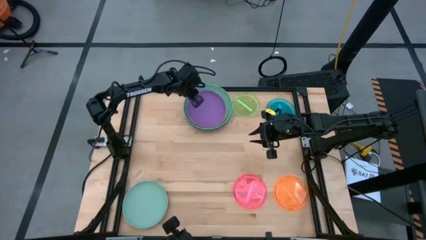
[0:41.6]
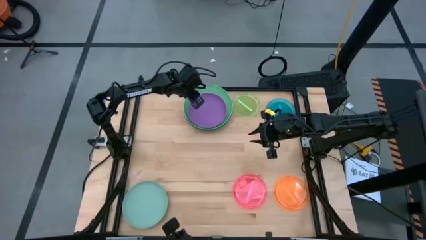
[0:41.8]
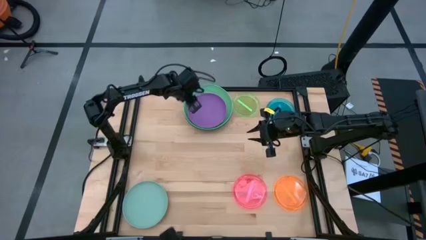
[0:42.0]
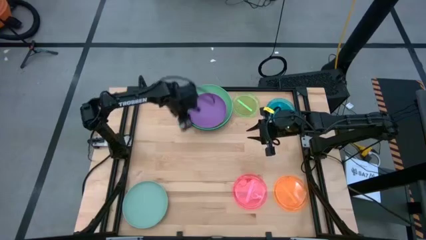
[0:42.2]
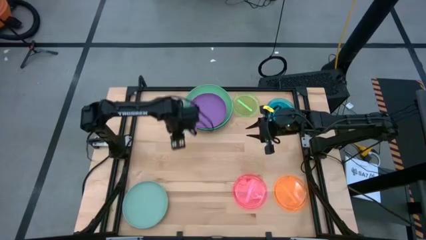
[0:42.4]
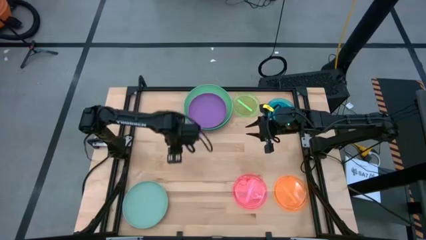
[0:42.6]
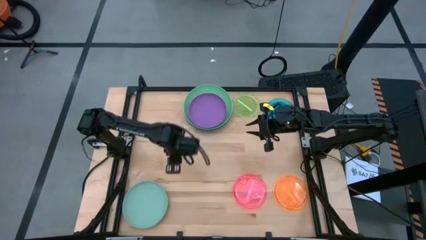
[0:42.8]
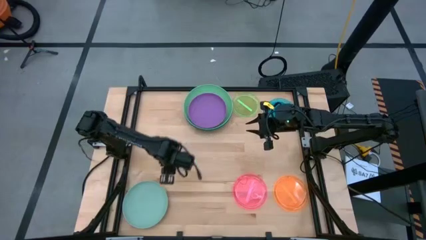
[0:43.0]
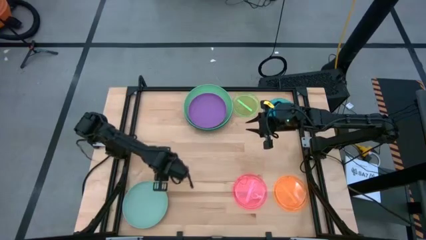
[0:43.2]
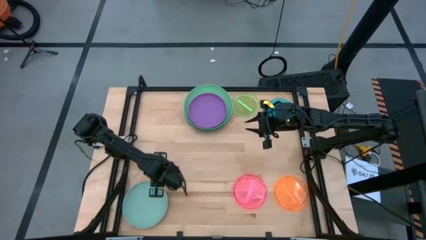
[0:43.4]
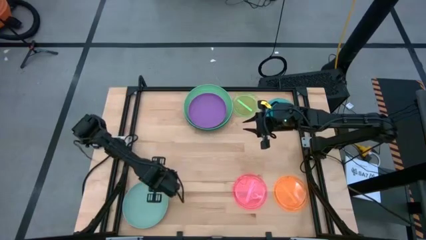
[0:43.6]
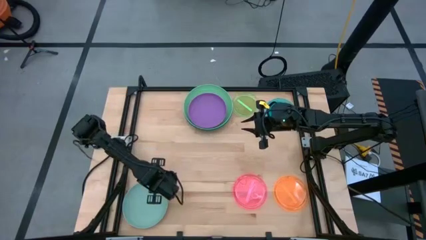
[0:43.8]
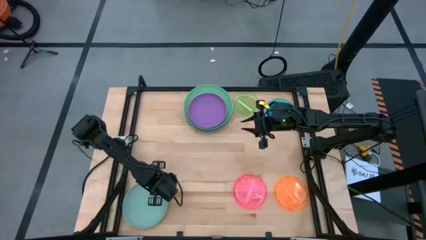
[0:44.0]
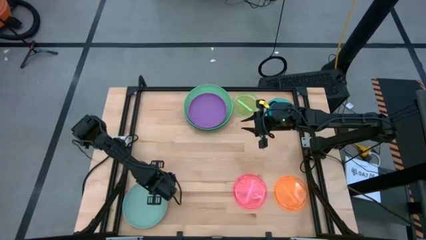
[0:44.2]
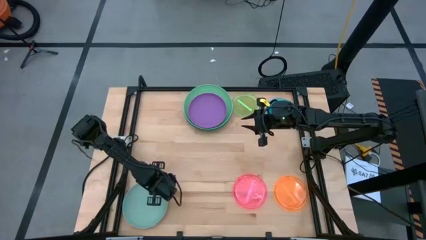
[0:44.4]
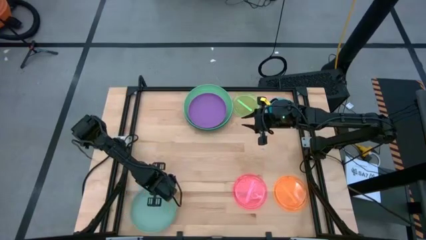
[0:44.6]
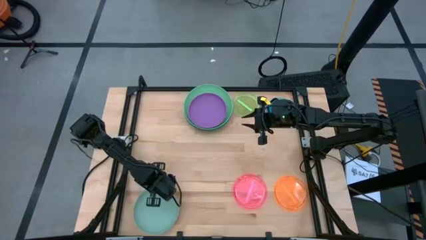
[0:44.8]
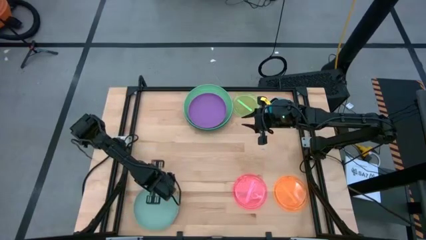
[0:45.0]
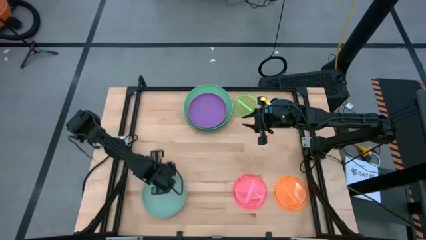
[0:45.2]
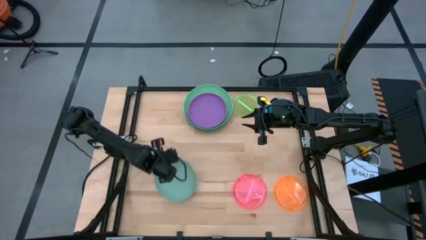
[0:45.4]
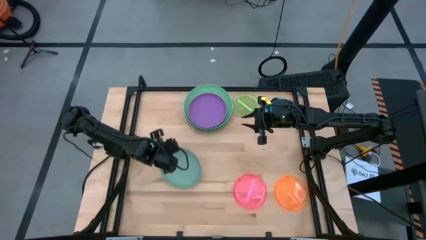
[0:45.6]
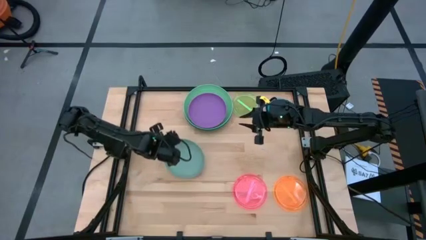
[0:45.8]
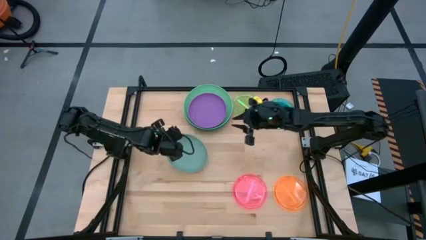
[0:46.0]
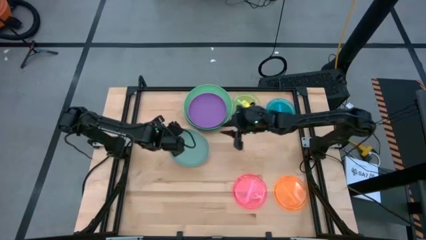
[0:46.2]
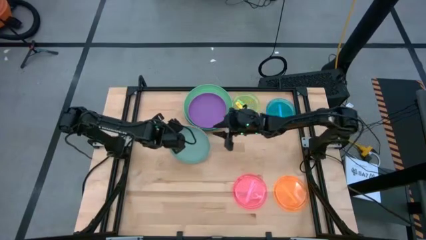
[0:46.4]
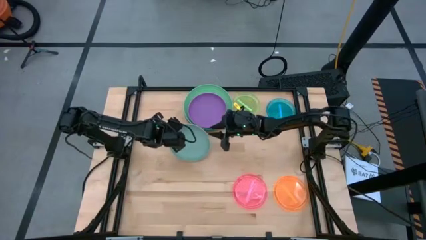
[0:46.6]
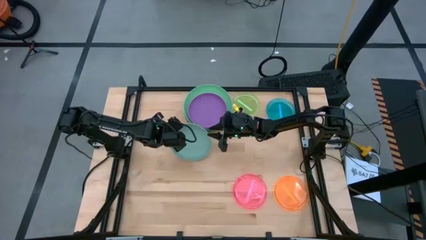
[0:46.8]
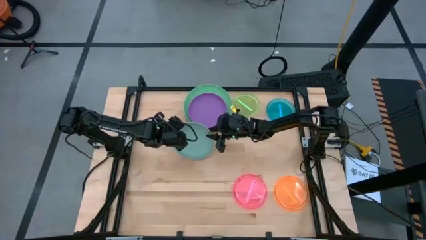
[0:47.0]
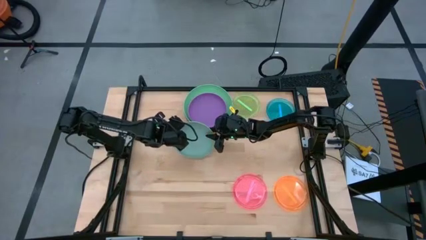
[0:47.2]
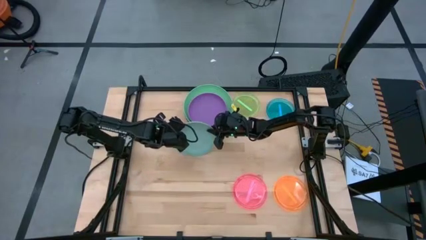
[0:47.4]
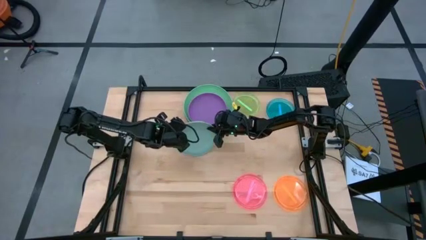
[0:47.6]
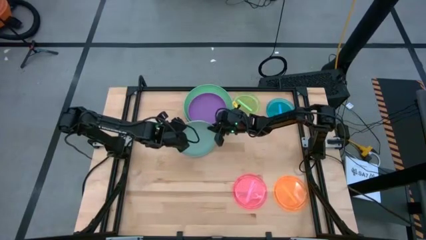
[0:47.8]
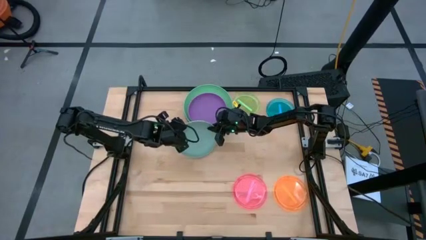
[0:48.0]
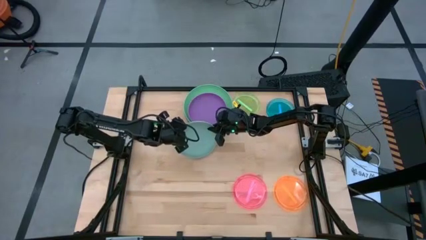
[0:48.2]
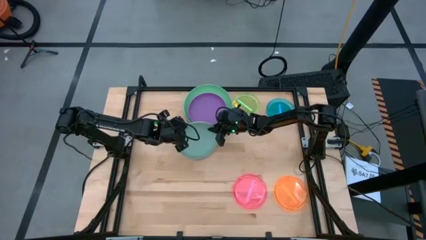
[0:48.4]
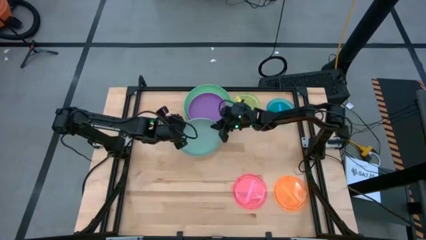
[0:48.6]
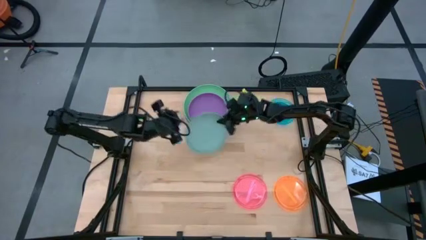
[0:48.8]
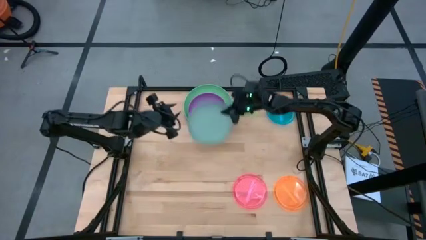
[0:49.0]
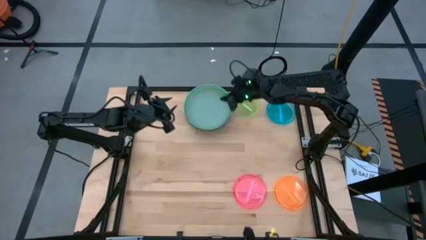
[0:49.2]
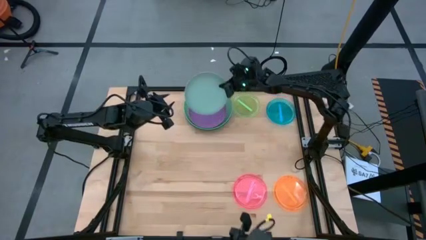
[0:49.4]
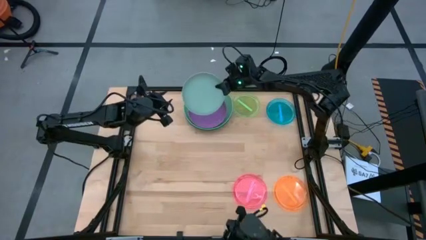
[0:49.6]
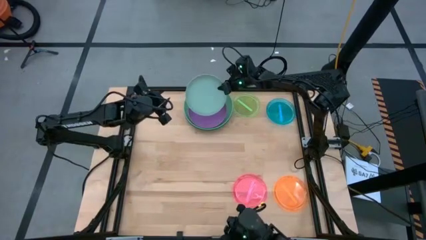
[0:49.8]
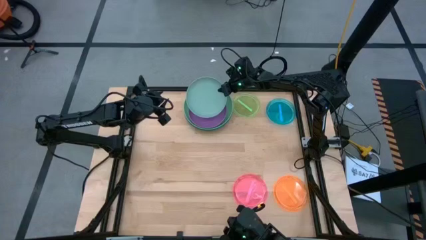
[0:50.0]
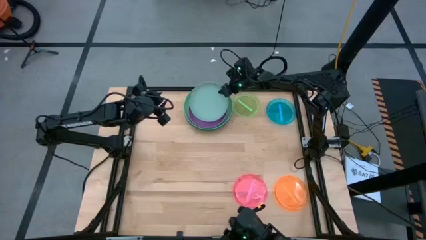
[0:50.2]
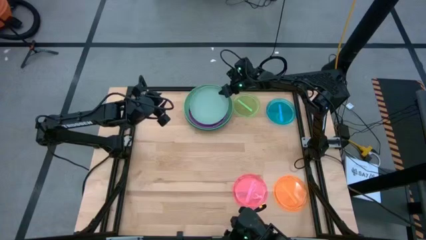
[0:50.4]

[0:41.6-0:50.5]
Task: Stack plastic plates
Stack the light blue plate on top of the purple plate

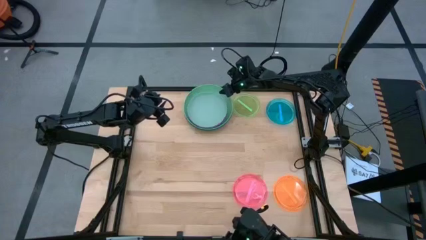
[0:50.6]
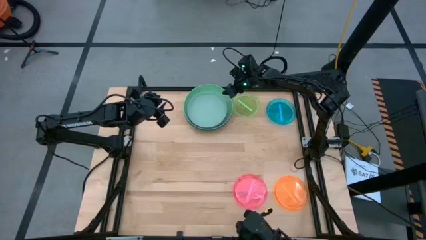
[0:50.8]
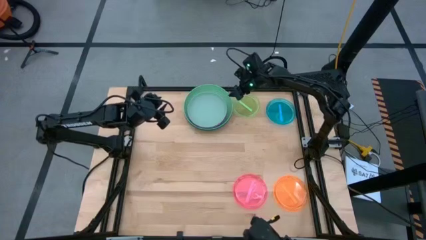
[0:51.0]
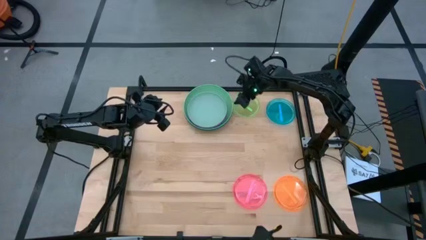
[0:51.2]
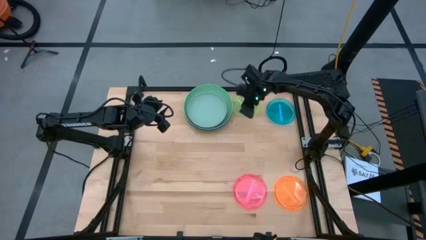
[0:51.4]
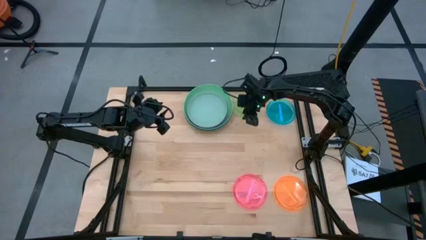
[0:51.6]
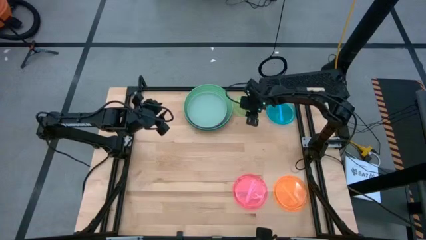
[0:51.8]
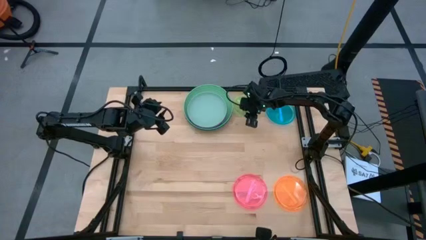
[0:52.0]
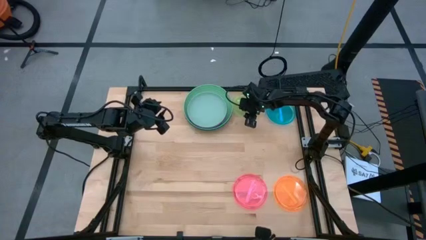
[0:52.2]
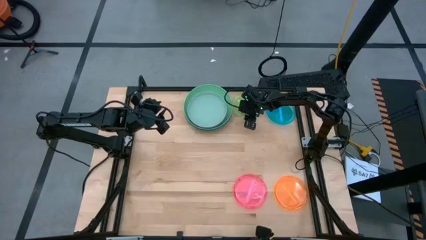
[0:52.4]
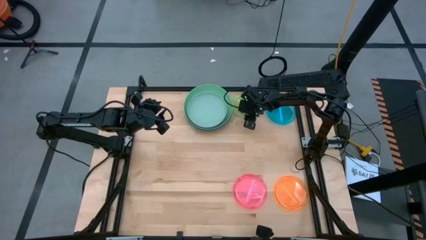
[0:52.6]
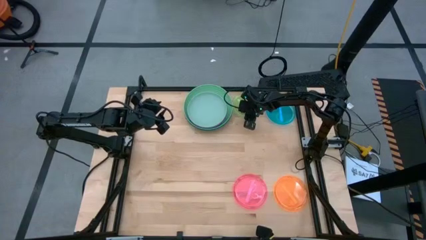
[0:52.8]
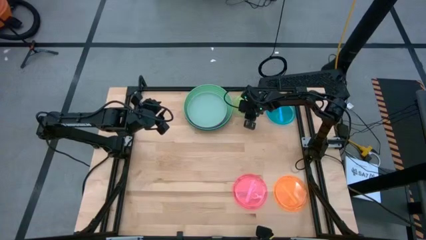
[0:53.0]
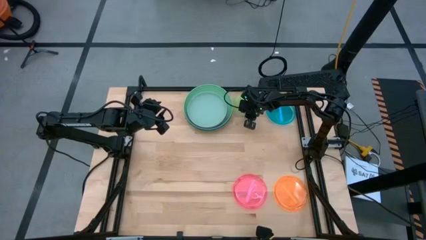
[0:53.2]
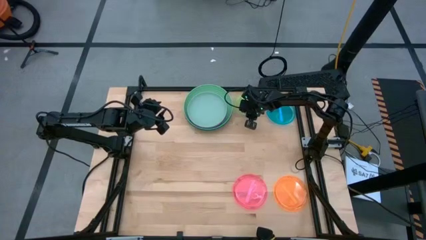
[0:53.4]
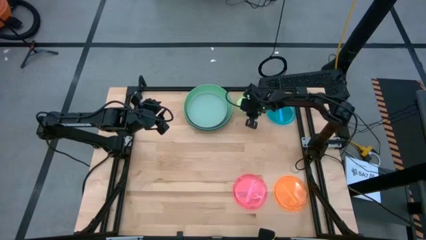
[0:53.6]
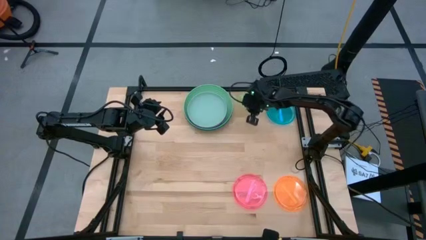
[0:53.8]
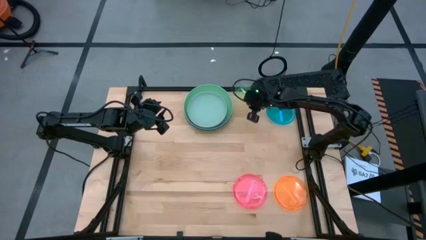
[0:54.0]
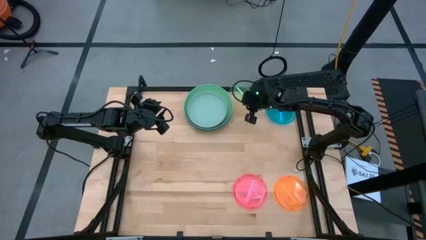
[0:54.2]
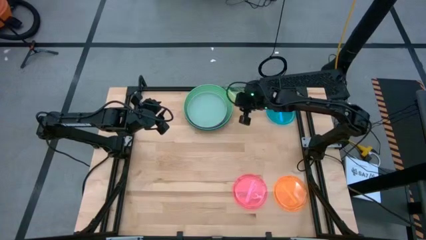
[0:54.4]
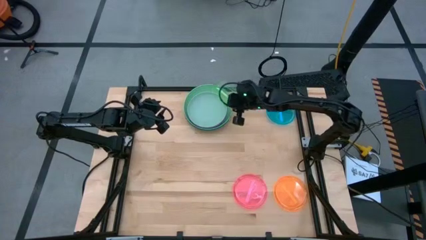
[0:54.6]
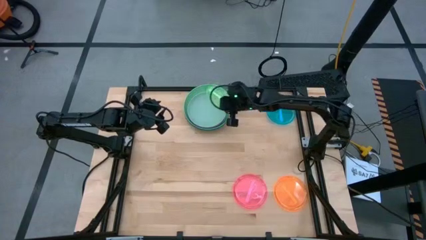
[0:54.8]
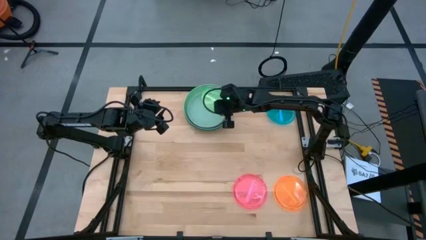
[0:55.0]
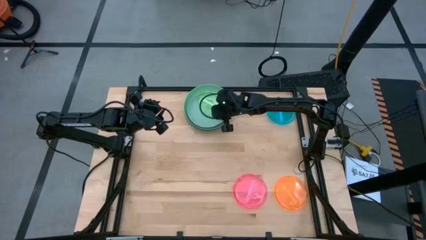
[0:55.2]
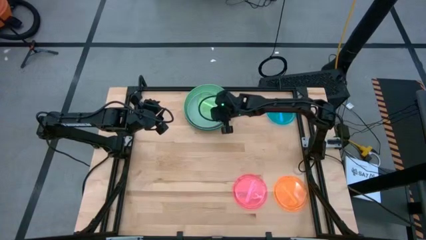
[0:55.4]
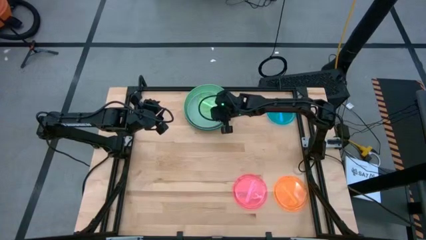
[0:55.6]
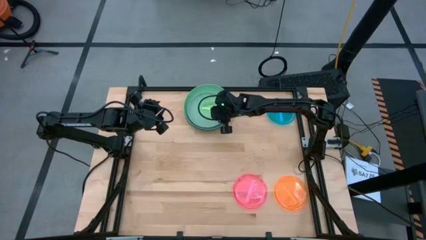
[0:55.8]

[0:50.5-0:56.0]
Stack the light green plate on top of the light blue plate
